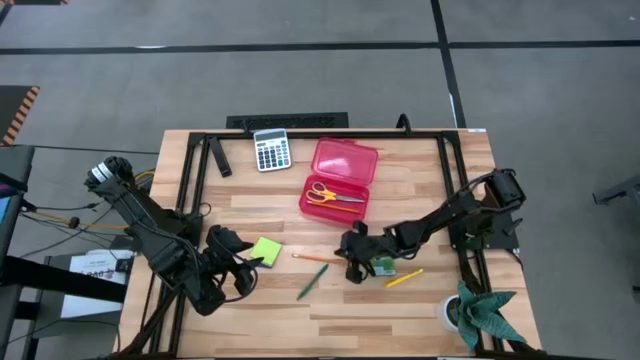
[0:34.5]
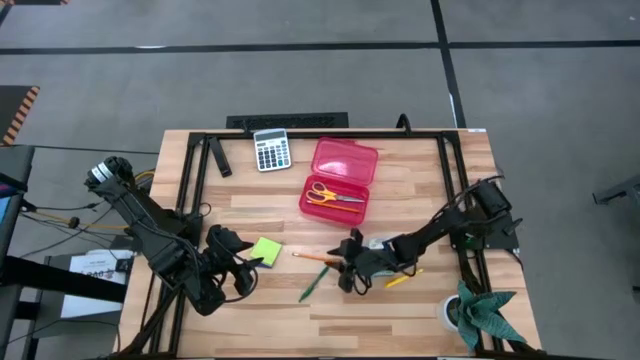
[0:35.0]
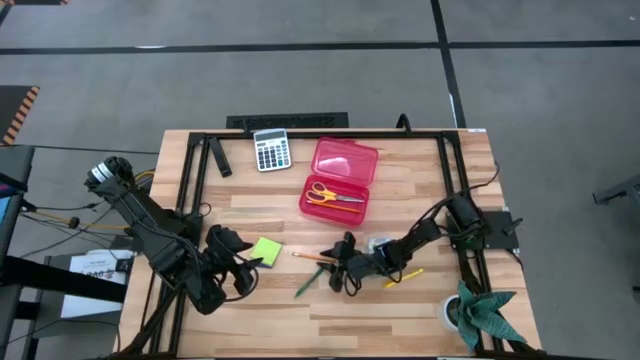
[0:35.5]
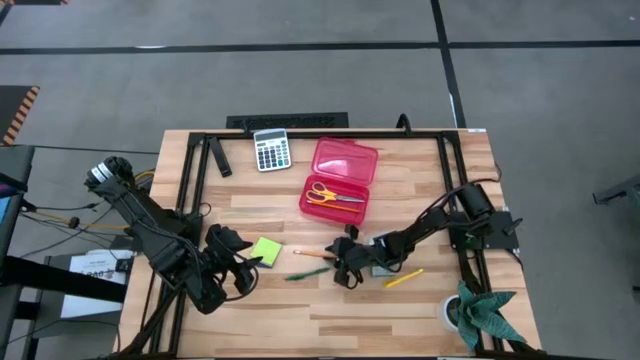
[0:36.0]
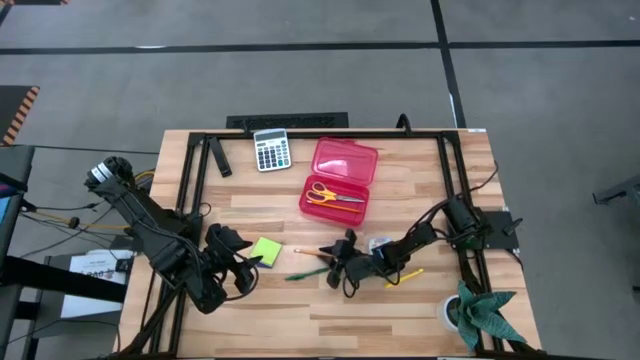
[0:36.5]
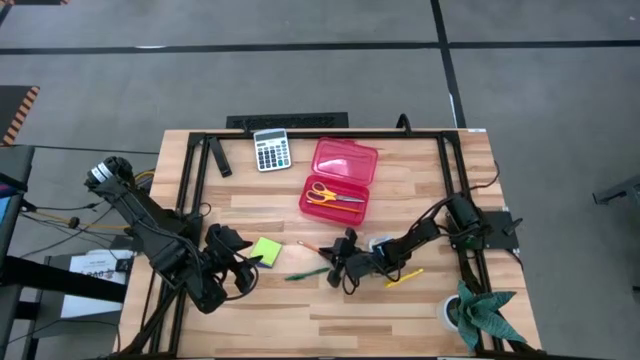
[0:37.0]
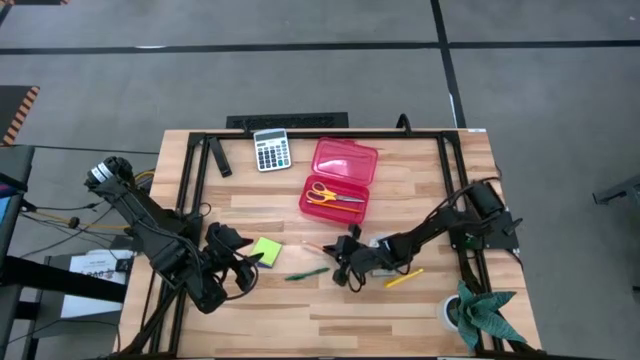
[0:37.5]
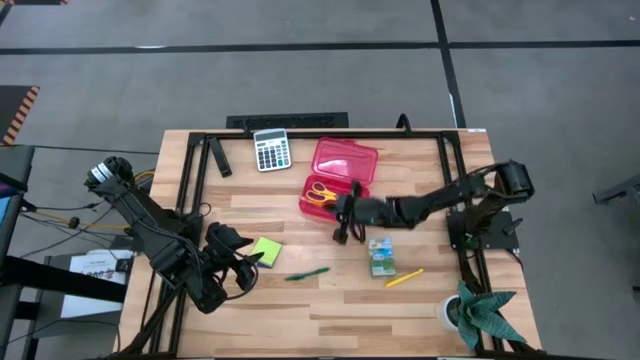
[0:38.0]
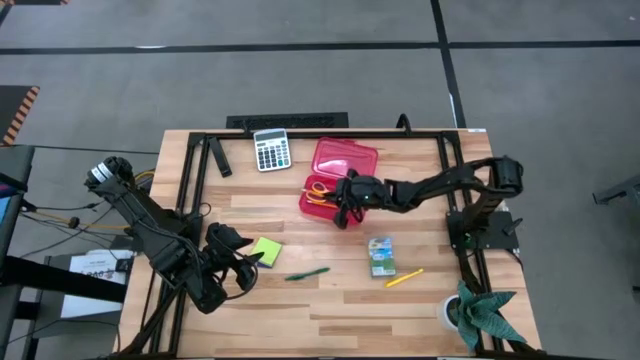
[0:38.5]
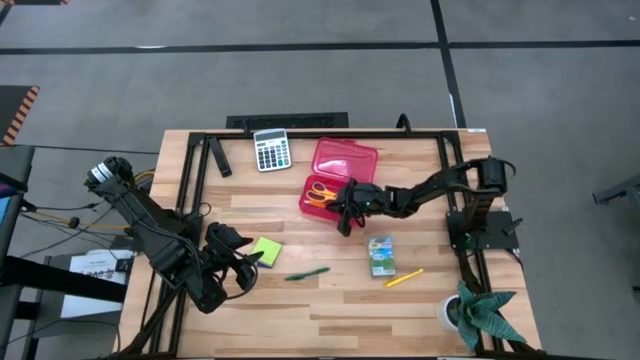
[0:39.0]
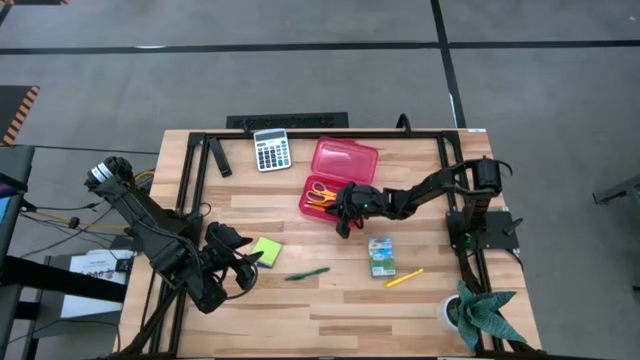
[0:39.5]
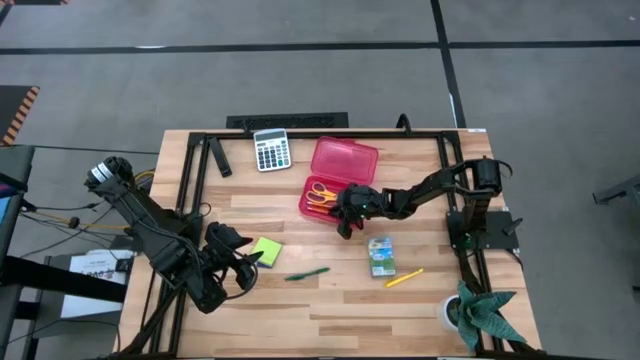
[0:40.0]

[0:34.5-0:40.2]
Task: Pack school essentials
Put the pencil into the supply box

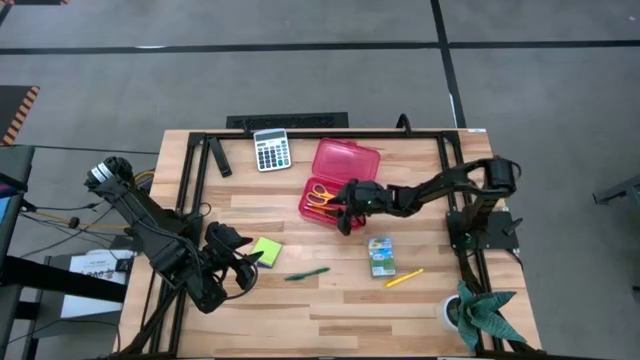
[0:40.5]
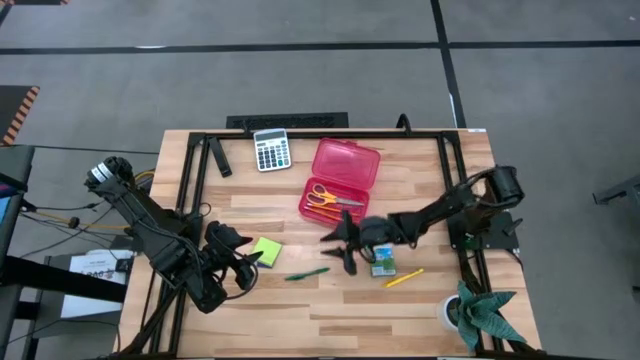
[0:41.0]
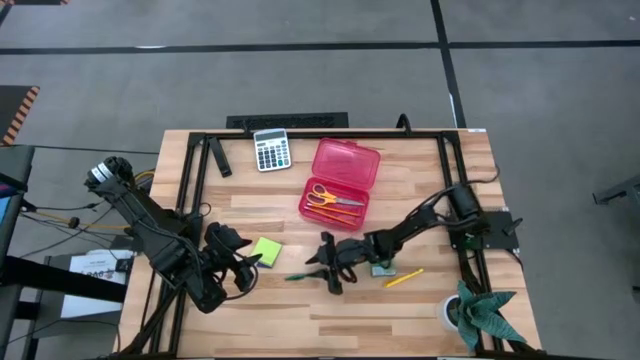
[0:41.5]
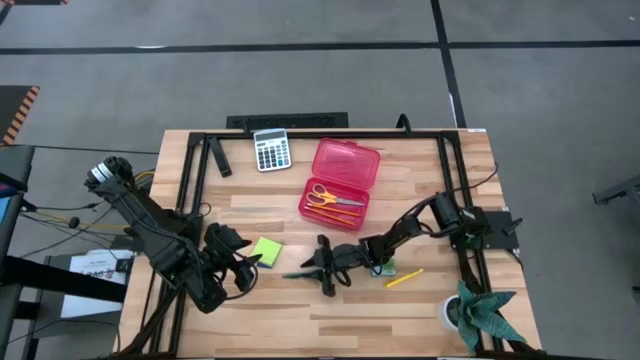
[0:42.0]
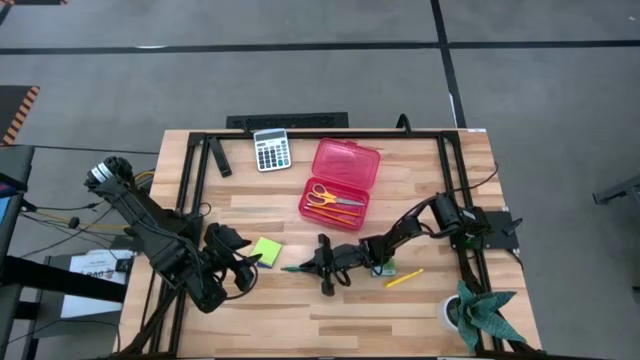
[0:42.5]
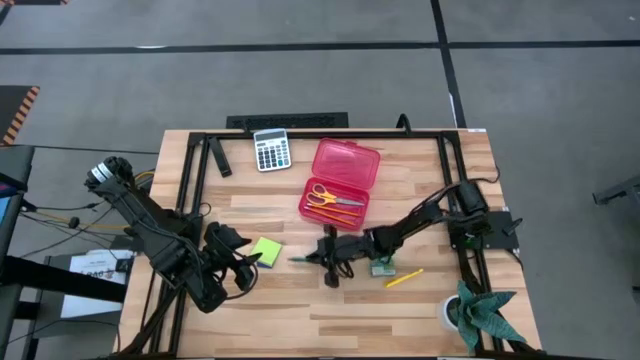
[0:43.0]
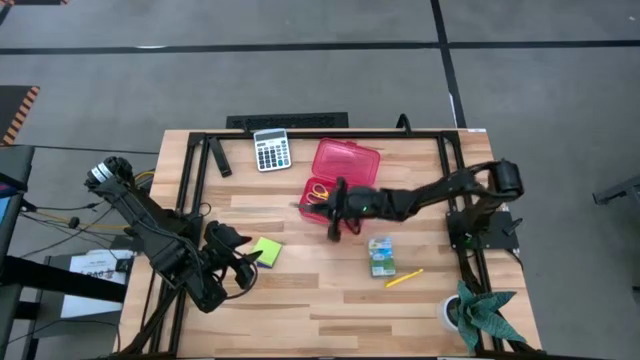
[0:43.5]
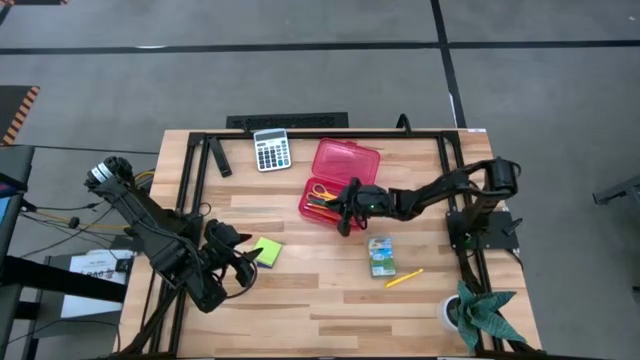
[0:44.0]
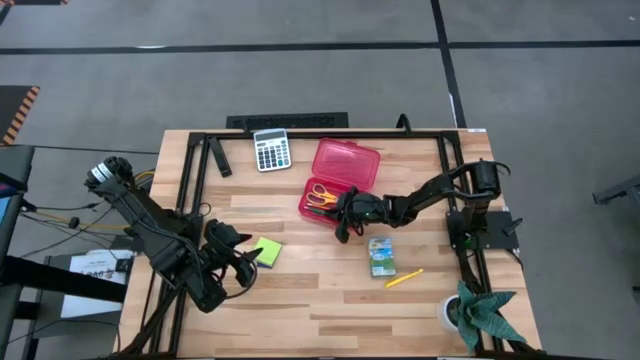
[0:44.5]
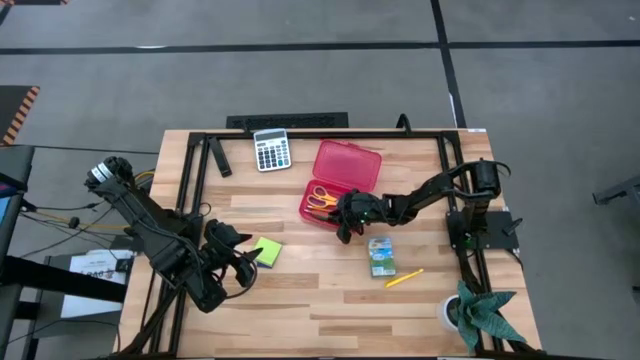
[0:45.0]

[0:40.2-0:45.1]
Put the green pen into the supply box

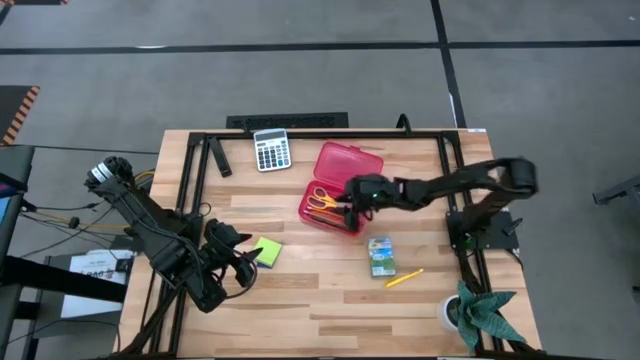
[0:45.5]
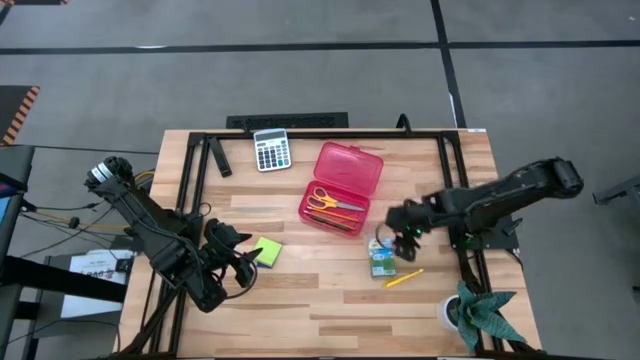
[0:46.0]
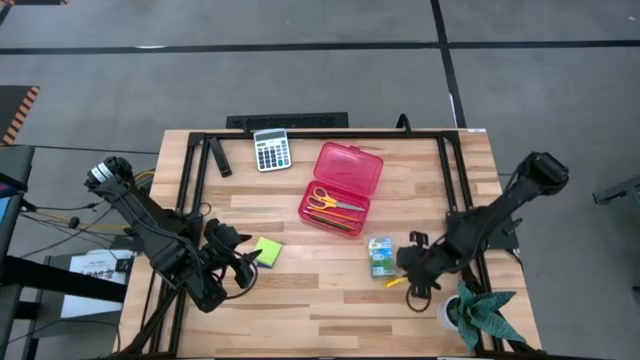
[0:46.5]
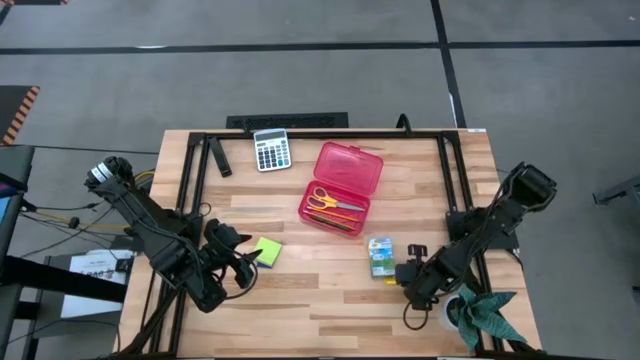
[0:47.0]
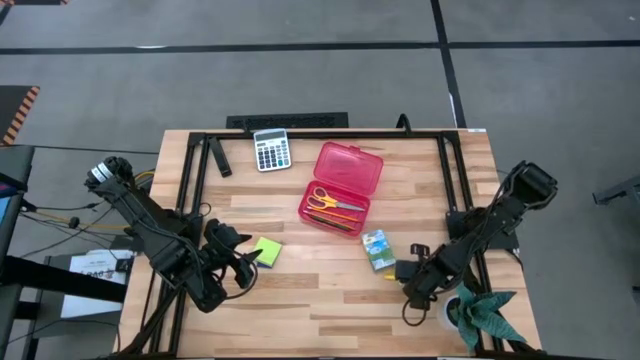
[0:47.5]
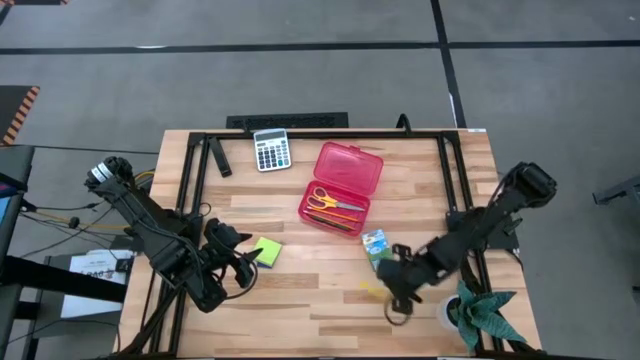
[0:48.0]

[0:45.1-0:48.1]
Put the yellow pen into the supply box

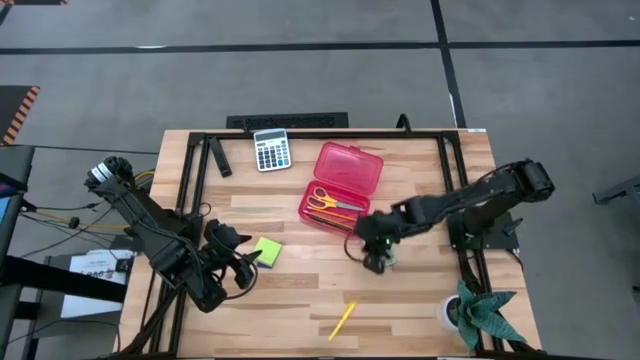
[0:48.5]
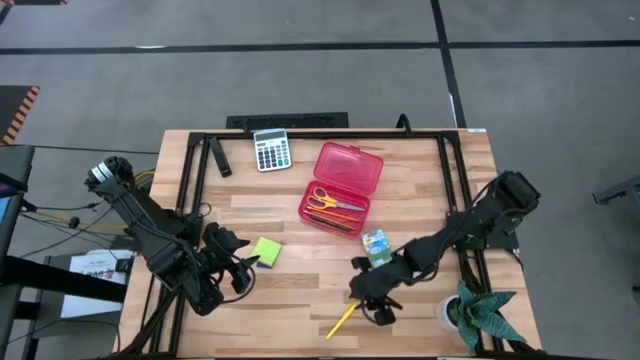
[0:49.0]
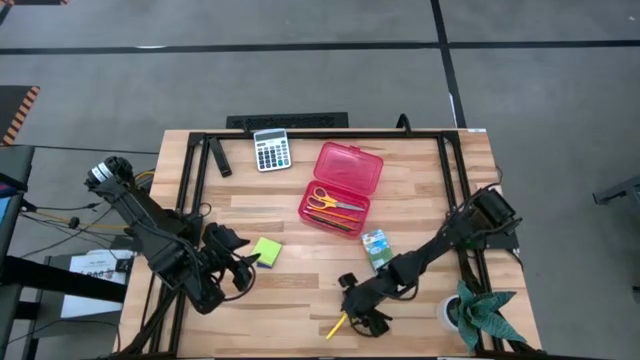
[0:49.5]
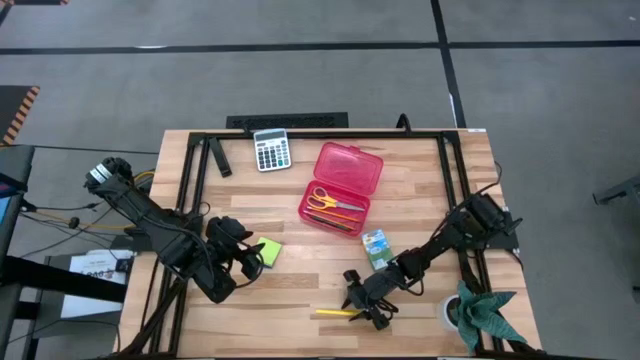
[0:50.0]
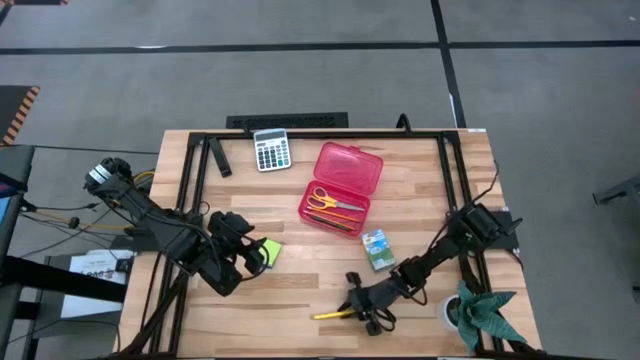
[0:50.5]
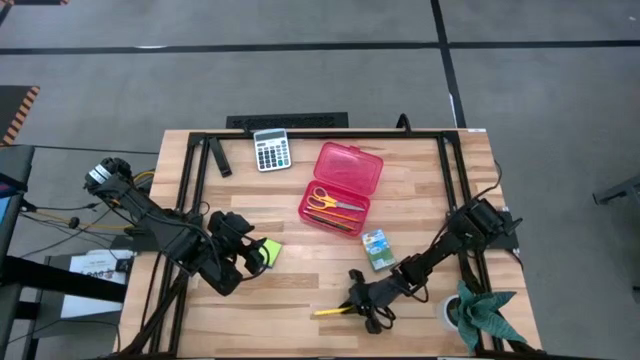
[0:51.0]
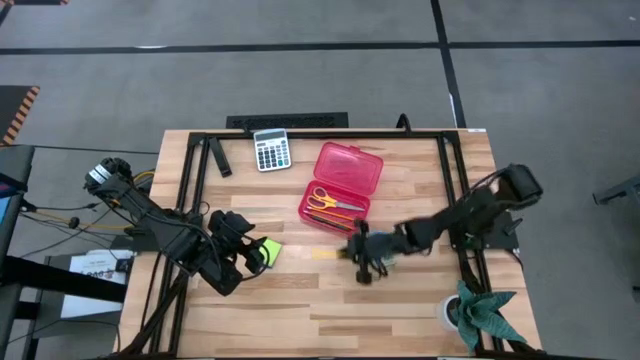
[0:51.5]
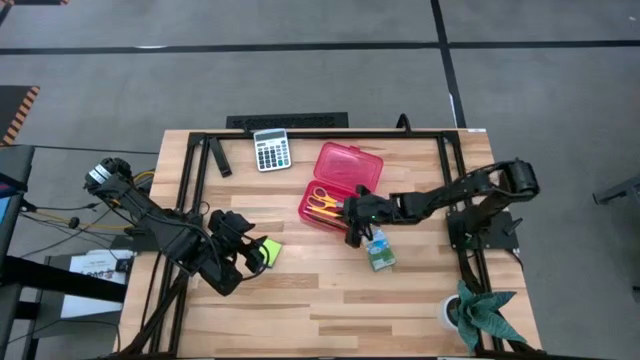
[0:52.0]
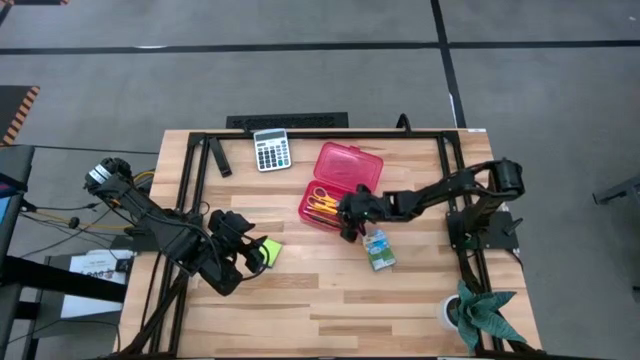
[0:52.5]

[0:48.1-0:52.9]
Put the yellow pen into the supply box

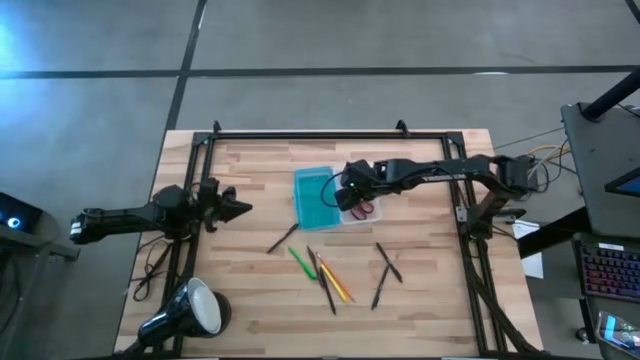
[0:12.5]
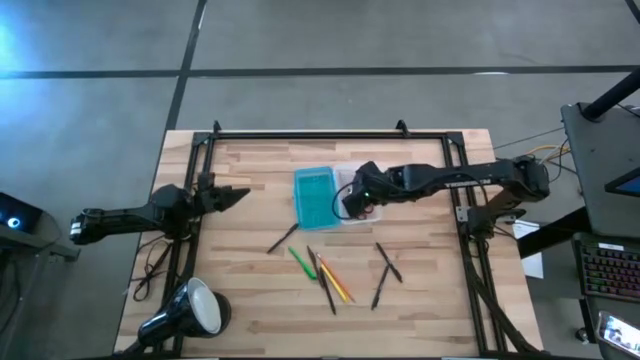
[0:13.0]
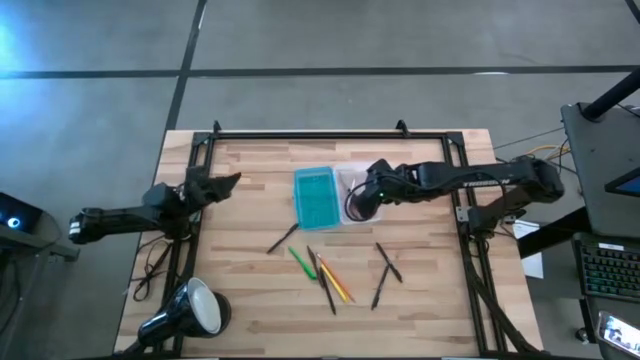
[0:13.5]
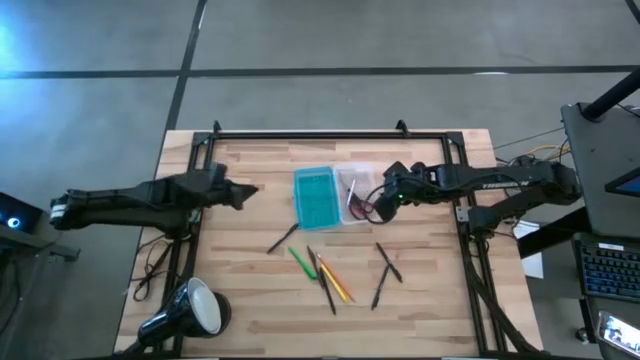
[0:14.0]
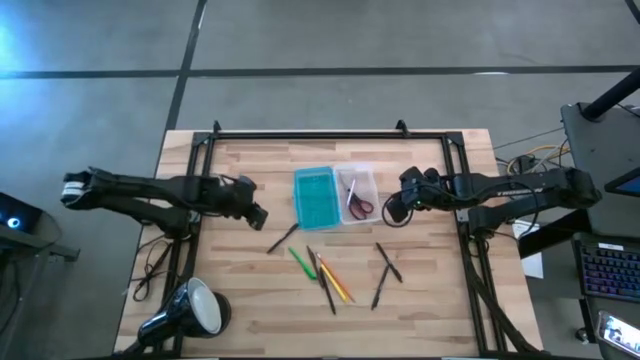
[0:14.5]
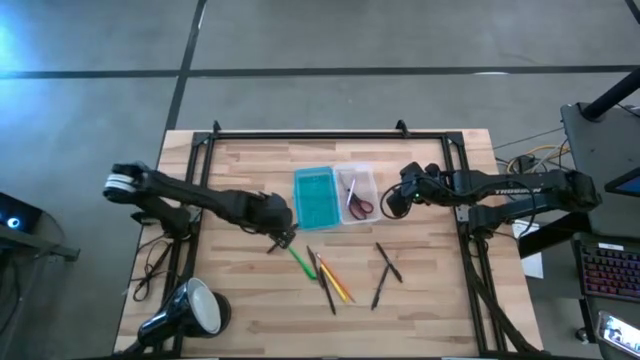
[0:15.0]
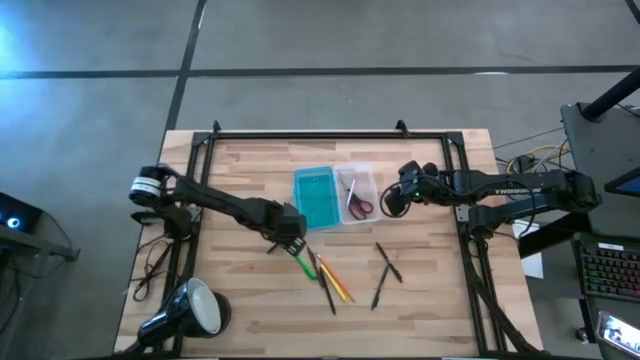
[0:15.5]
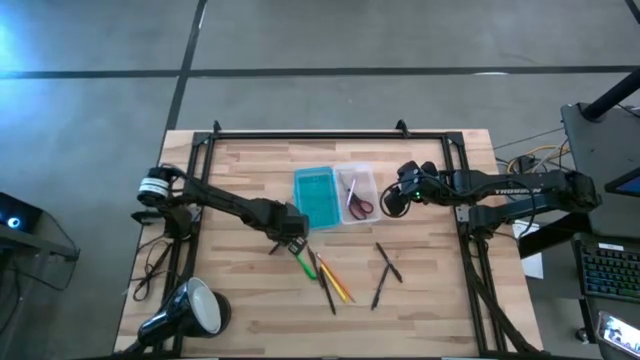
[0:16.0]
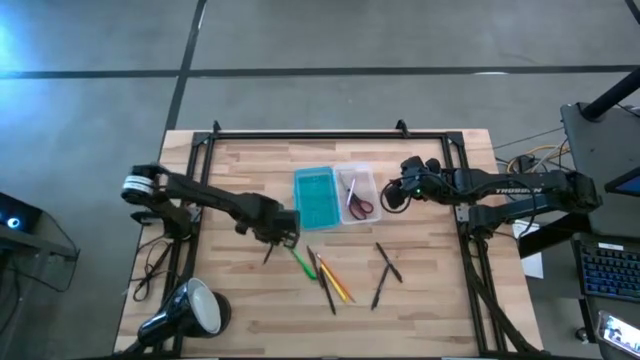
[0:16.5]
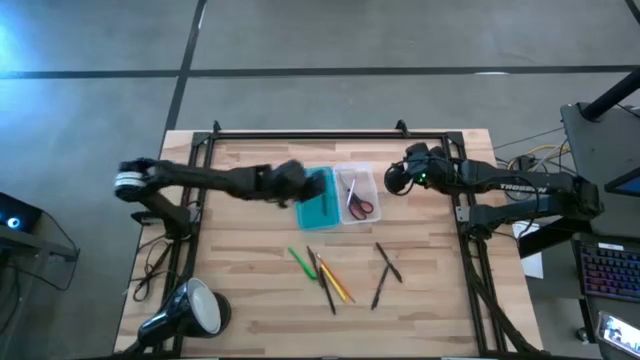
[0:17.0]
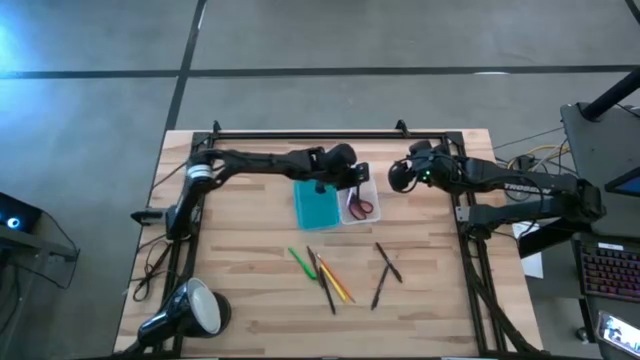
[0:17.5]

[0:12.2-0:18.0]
Task: Pick & place school supplies into a supply box
Put the black pen into the blue supply box
